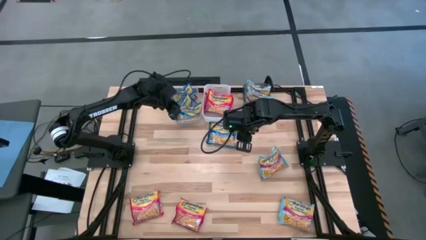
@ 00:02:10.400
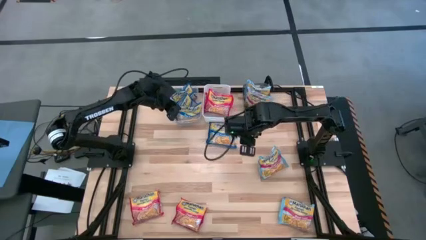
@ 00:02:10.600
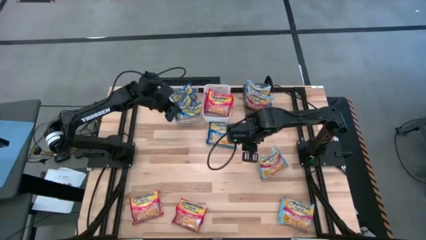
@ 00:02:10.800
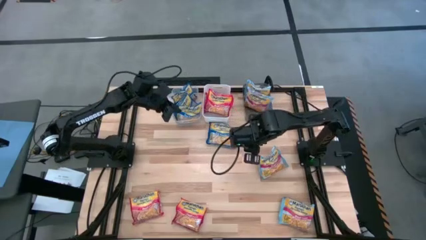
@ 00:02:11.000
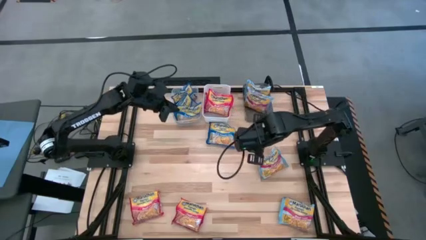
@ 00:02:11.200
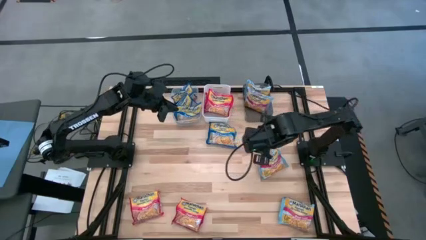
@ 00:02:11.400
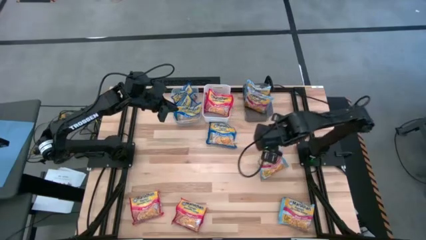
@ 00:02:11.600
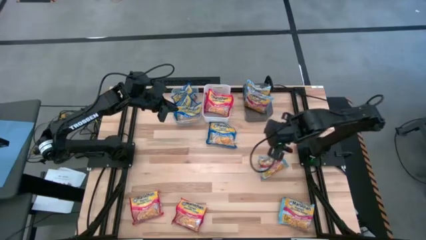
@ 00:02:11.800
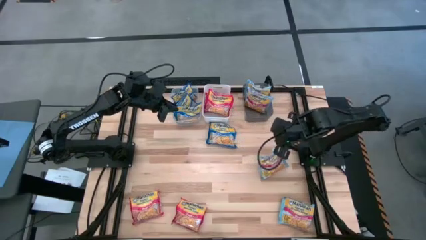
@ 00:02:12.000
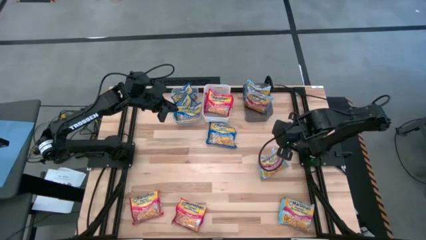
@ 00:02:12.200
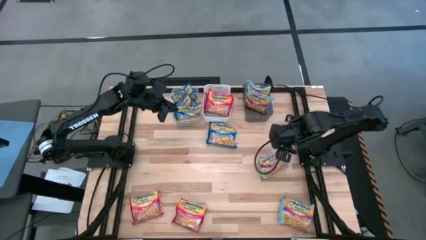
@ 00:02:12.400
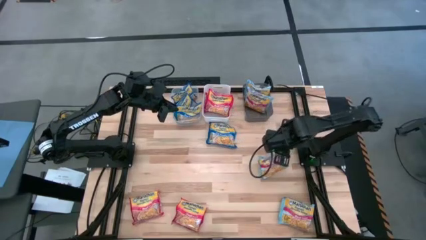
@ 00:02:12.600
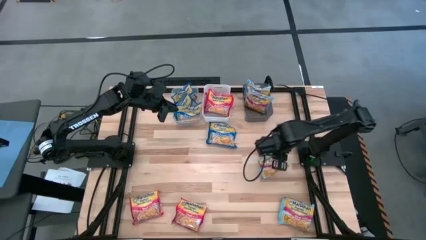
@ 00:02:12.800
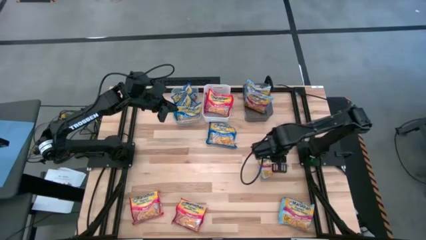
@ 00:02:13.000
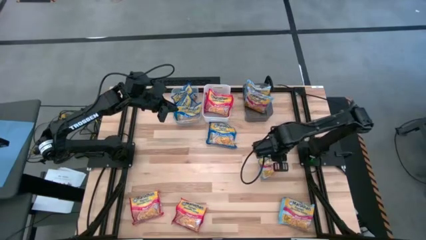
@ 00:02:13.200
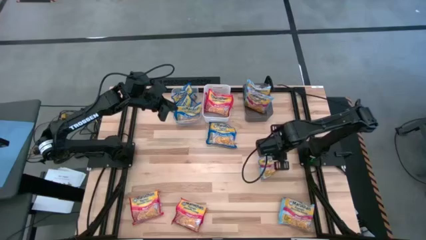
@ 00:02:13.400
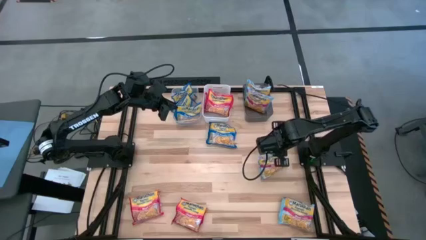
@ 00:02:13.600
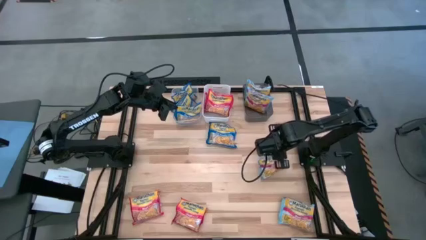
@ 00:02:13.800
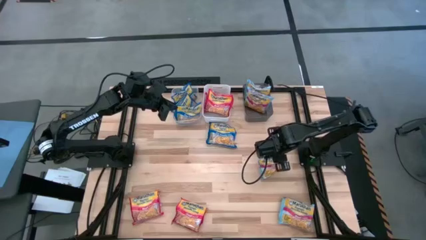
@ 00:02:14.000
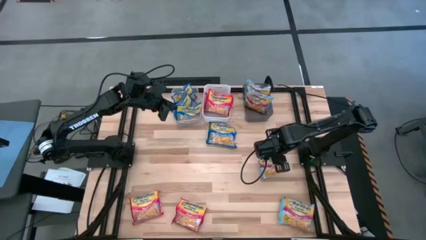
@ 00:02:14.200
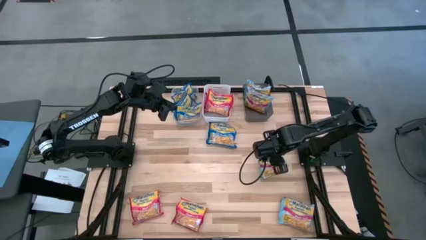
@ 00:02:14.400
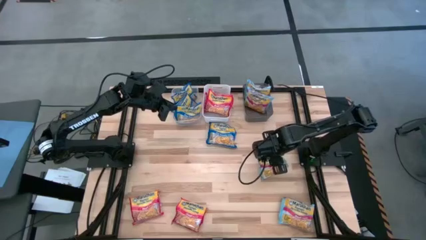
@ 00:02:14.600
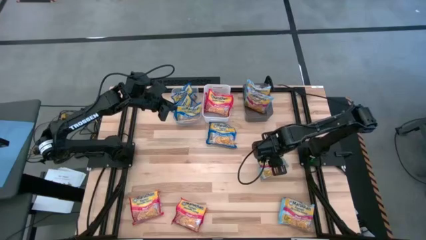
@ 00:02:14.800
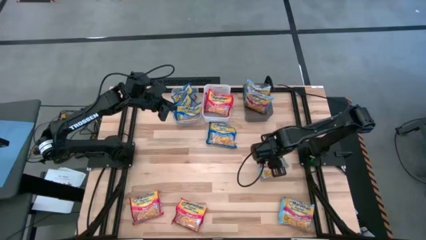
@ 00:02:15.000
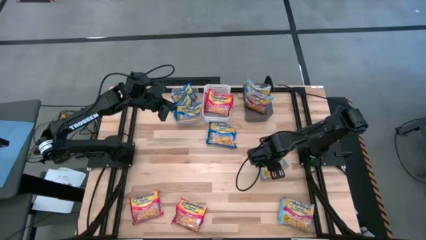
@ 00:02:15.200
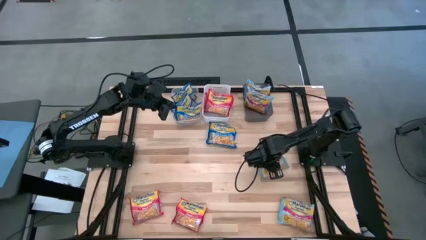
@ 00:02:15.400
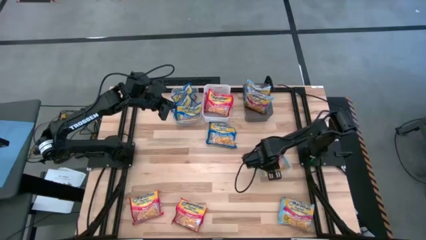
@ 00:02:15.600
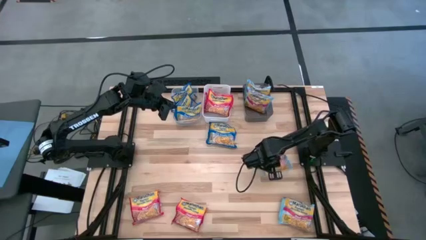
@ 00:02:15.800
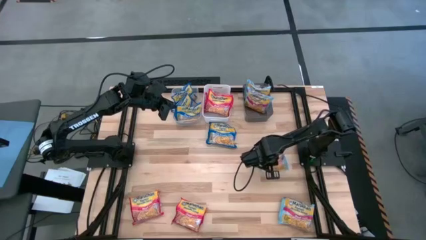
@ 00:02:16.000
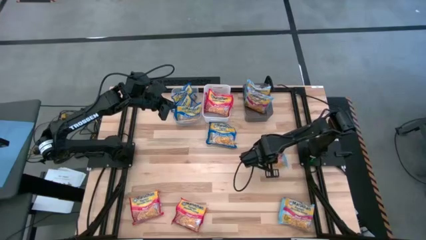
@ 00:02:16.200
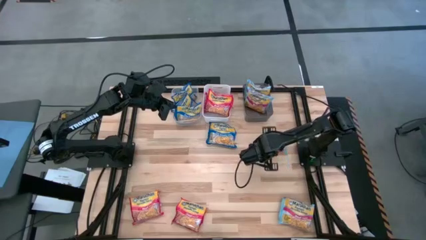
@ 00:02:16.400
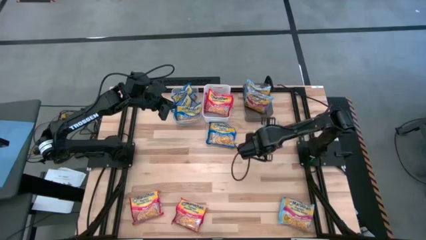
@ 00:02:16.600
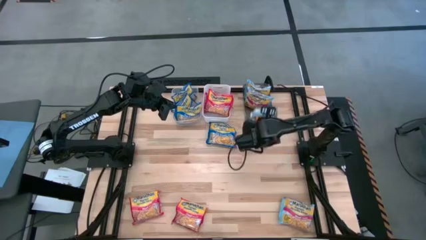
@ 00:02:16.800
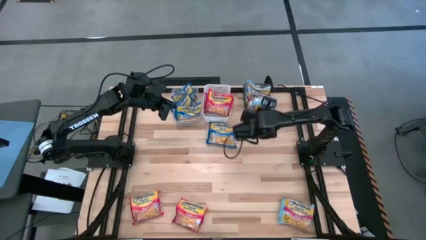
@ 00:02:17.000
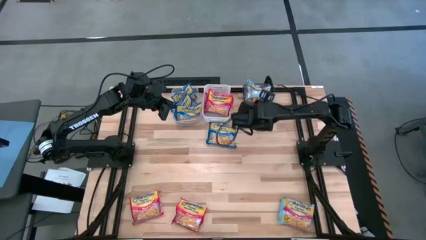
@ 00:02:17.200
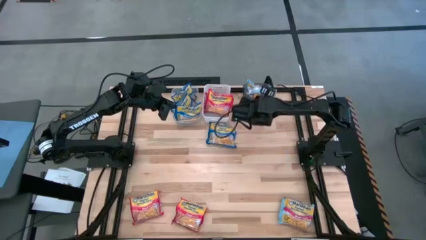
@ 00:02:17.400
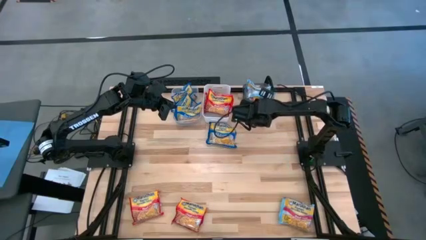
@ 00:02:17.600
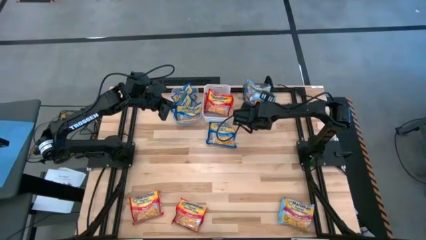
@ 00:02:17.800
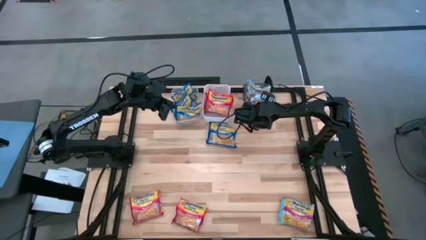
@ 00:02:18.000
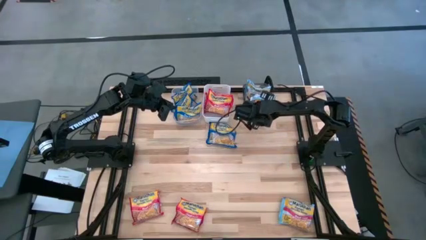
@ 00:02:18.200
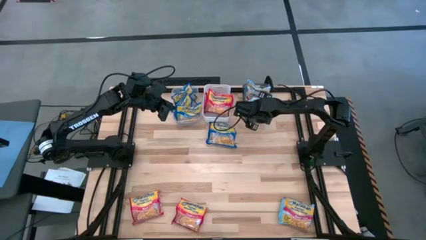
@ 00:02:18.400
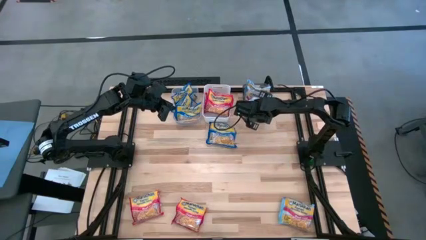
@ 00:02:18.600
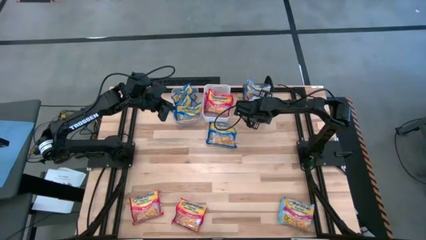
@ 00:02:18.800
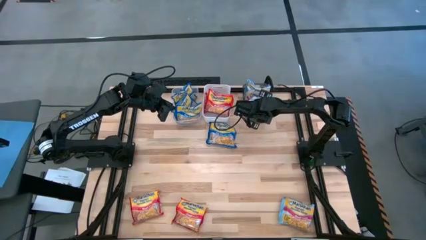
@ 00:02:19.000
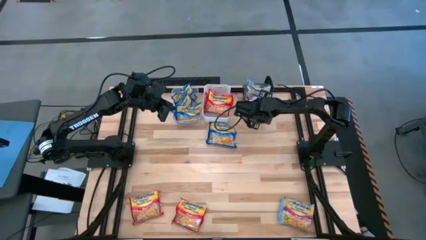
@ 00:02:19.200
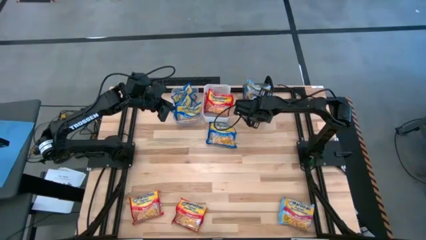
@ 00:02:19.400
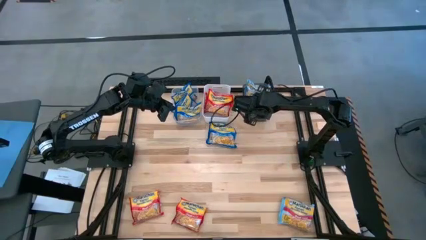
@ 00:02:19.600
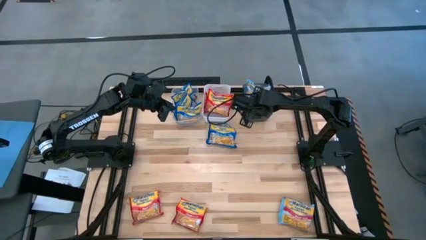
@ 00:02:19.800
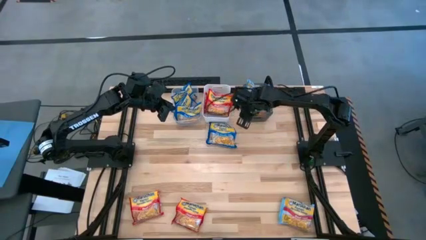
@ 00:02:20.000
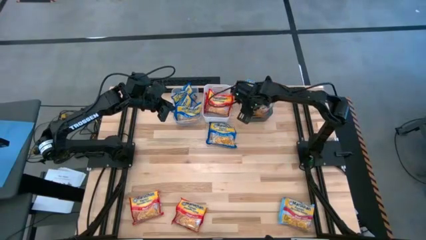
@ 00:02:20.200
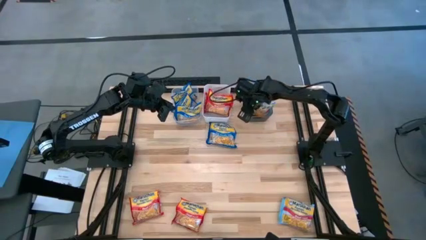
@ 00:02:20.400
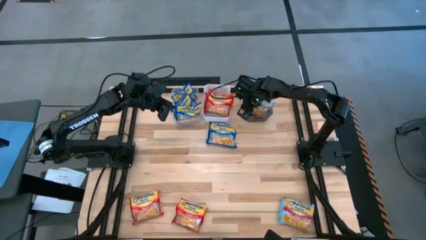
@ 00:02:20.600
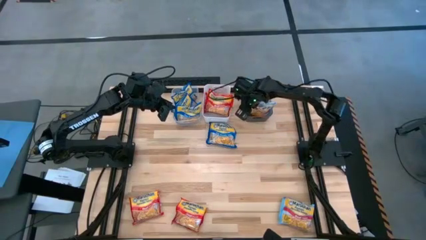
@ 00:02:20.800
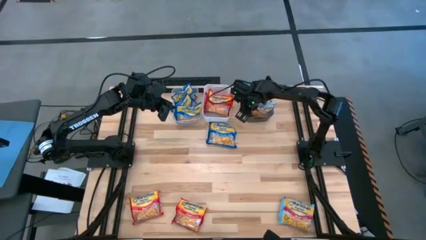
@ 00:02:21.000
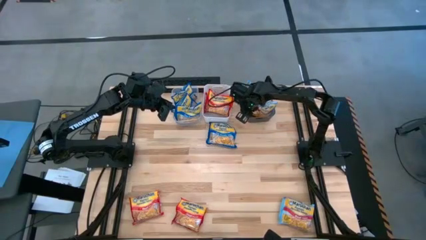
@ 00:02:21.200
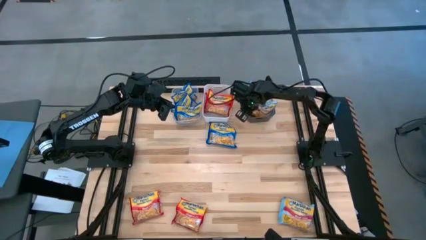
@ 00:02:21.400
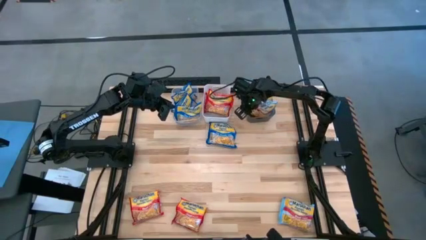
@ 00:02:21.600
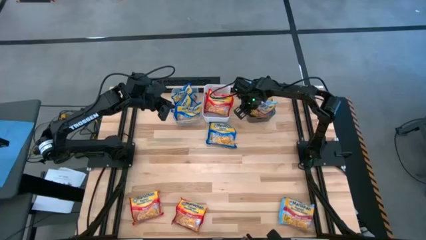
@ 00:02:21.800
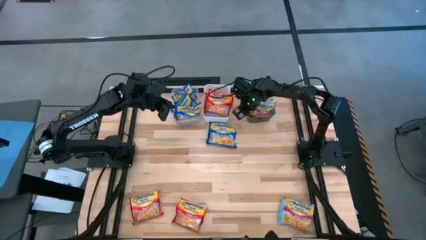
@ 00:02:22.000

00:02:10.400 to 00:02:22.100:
Task: Sort Maruchan noodles
Put the light blue noodle pack into the black bin

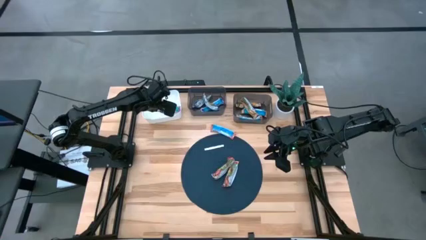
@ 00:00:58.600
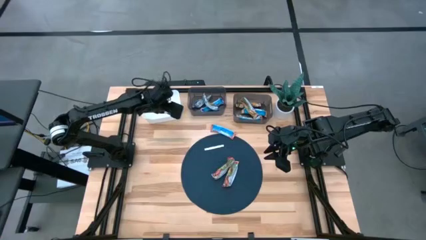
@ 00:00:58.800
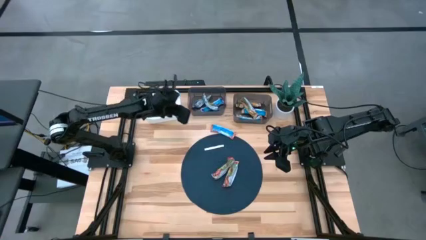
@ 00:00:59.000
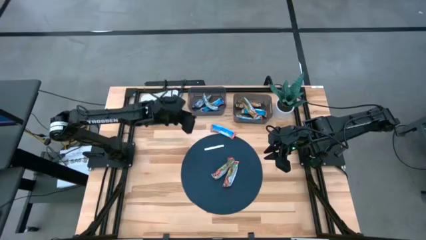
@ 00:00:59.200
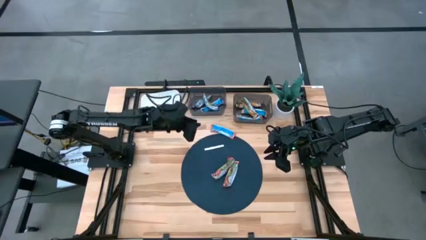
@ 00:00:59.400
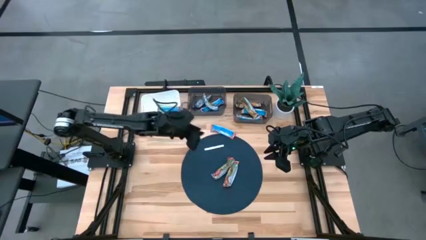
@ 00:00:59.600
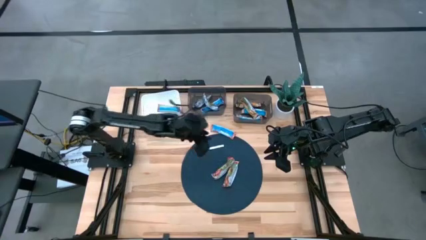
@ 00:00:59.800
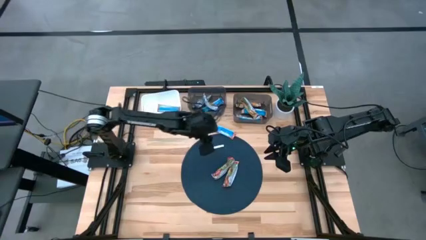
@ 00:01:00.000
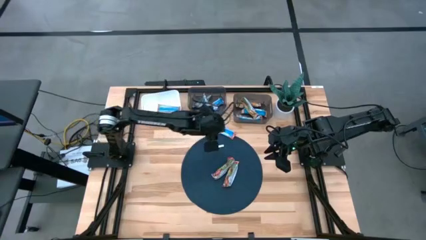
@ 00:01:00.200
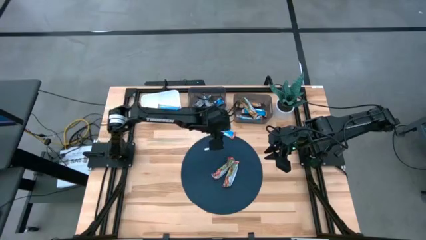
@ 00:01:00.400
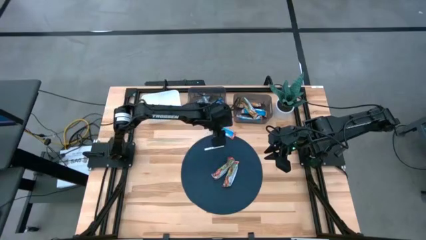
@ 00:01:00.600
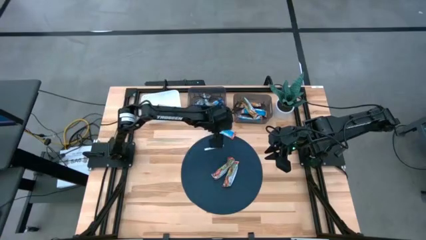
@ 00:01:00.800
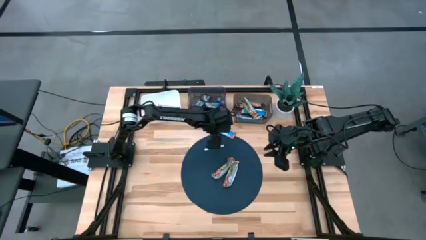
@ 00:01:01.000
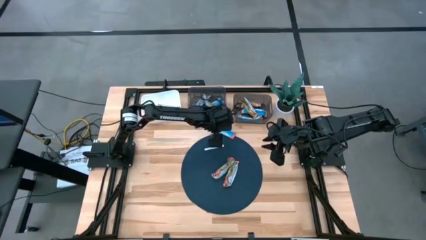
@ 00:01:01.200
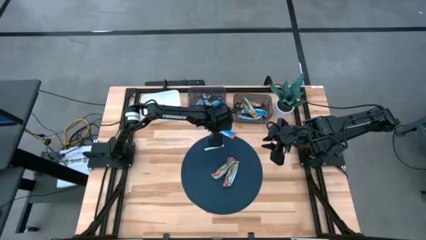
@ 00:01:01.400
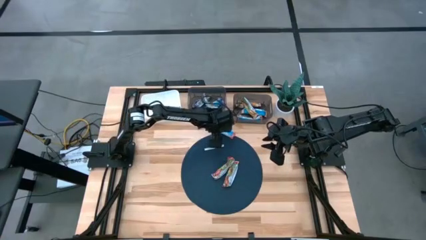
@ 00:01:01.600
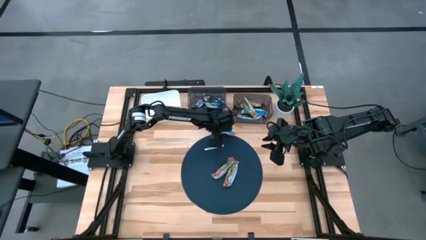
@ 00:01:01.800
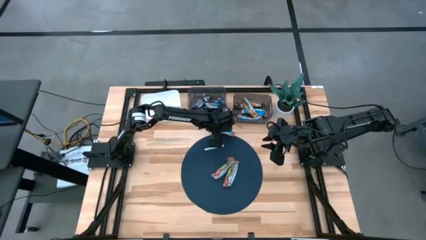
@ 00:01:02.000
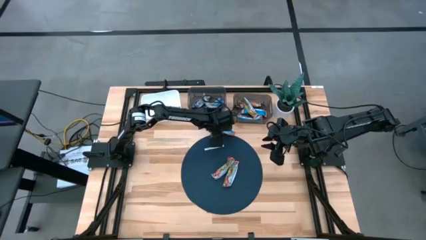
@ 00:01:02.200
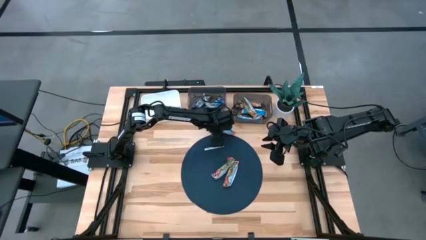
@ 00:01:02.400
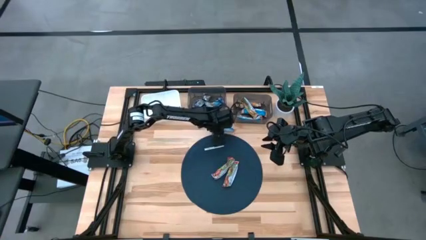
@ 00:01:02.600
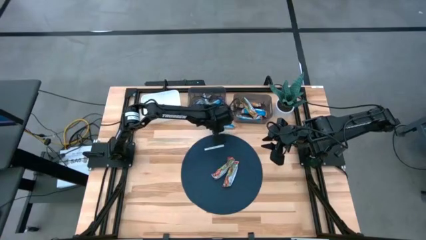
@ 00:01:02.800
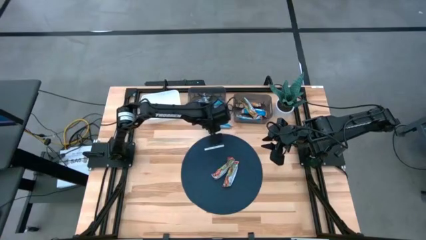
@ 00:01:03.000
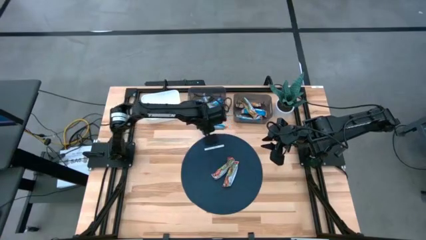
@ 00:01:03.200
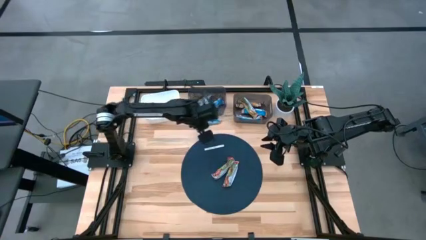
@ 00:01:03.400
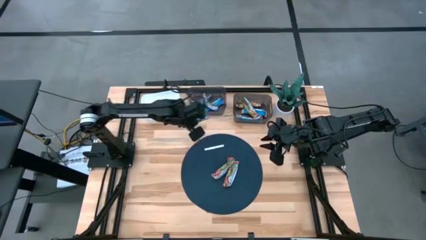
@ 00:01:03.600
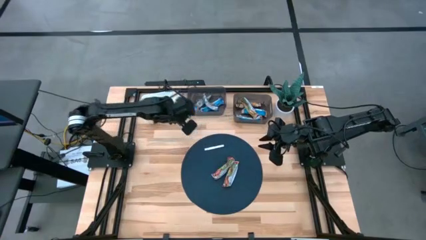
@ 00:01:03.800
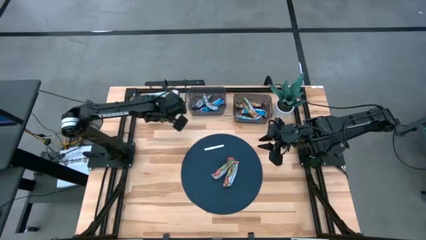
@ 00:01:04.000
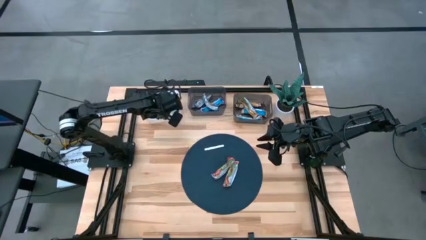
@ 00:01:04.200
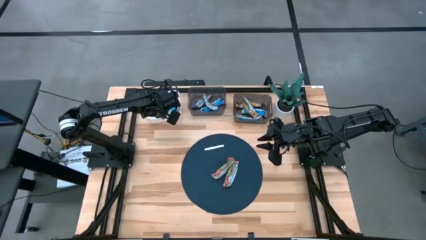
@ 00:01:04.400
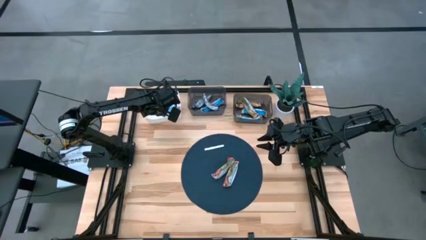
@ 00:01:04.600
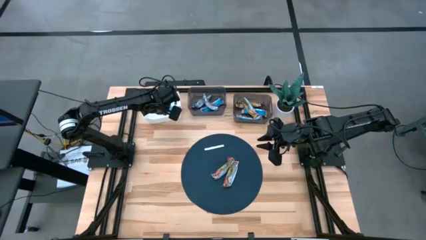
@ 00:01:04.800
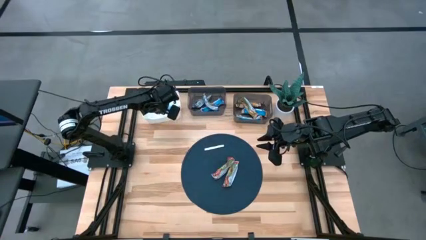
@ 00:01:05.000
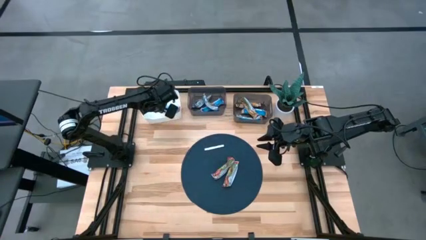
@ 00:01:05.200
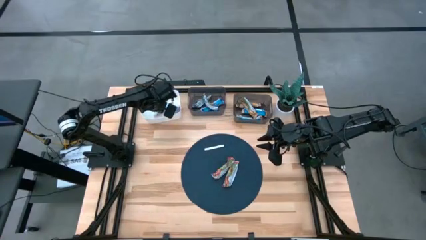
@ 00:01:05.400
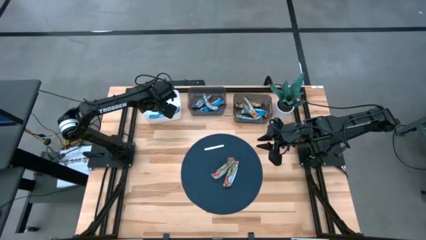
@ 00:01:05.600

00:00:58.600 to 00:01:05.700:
Task: Pick and place Granola Bars by type
Put the red granola bar into the white bin
